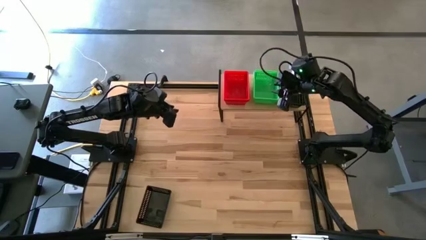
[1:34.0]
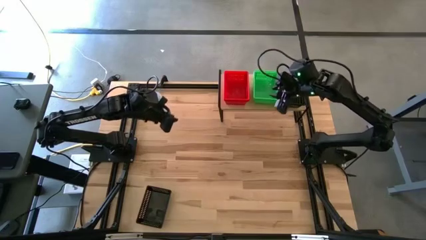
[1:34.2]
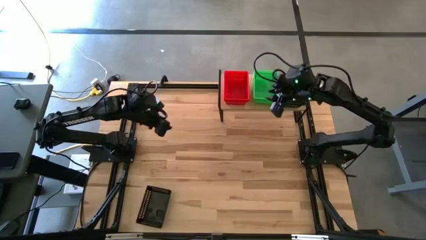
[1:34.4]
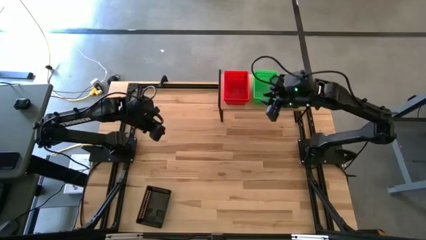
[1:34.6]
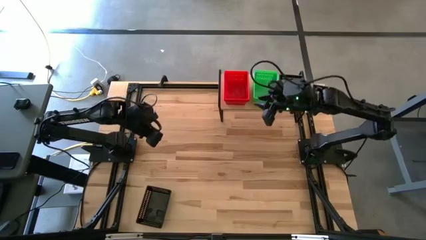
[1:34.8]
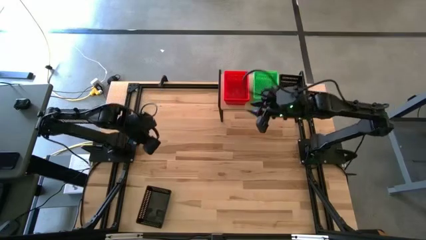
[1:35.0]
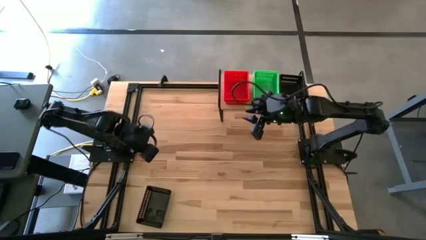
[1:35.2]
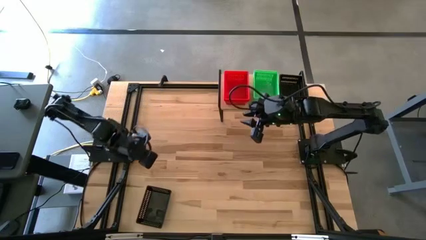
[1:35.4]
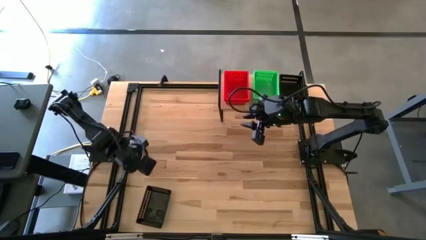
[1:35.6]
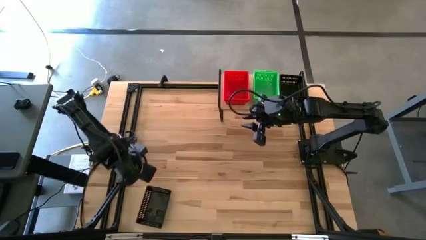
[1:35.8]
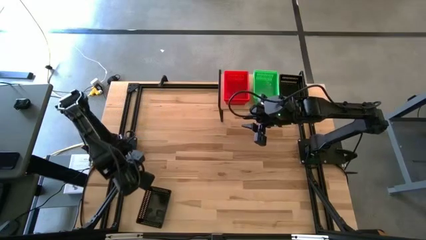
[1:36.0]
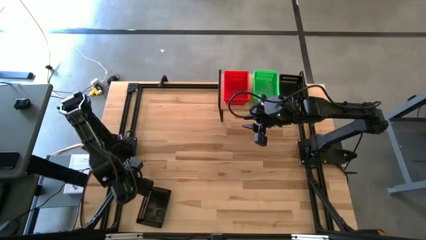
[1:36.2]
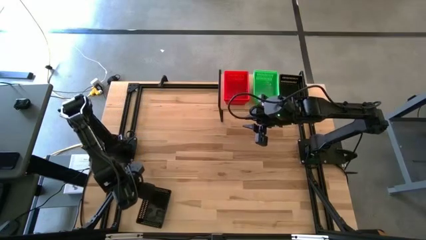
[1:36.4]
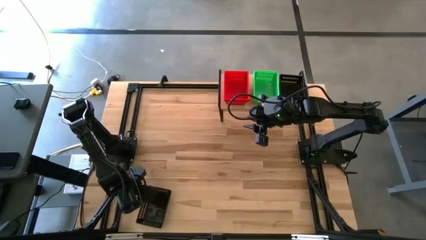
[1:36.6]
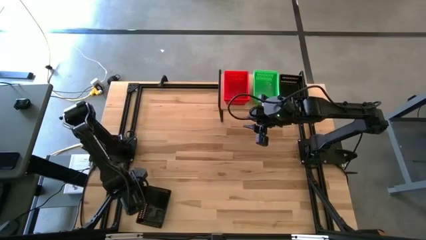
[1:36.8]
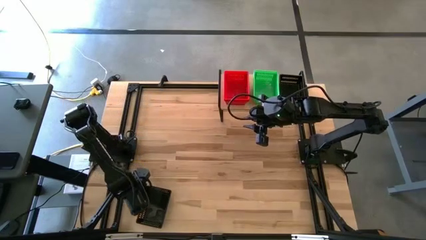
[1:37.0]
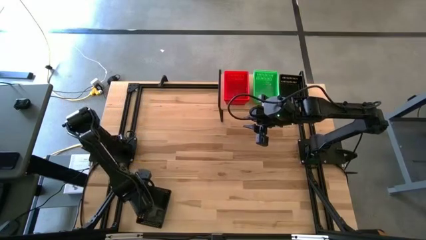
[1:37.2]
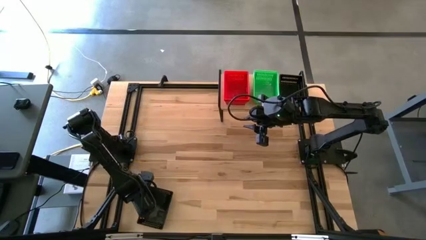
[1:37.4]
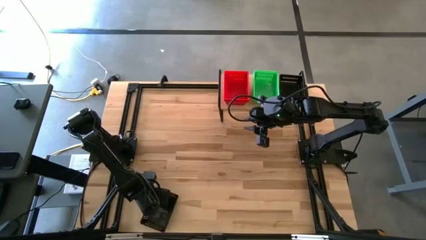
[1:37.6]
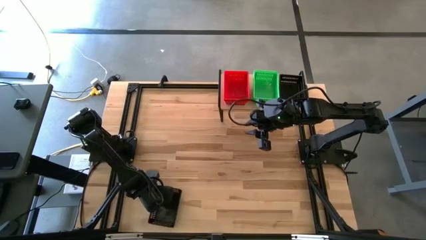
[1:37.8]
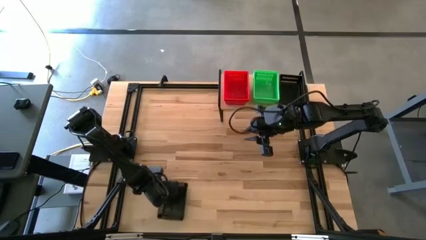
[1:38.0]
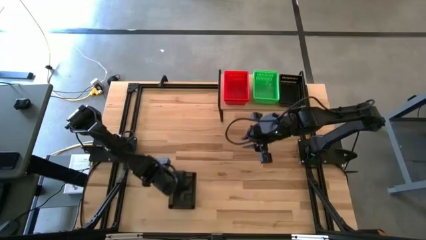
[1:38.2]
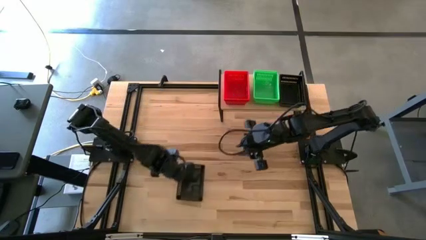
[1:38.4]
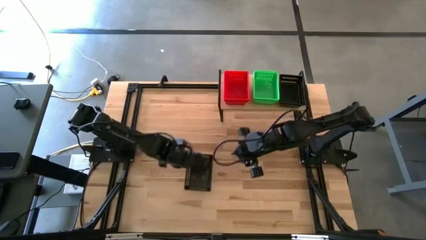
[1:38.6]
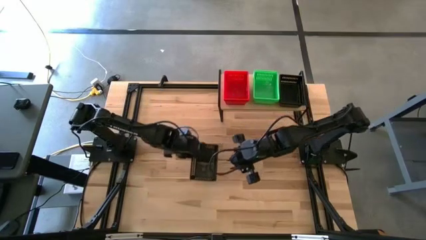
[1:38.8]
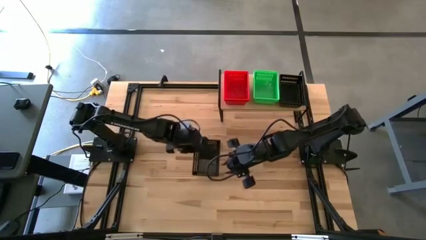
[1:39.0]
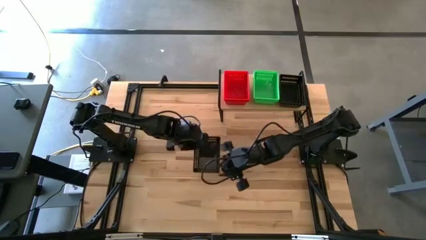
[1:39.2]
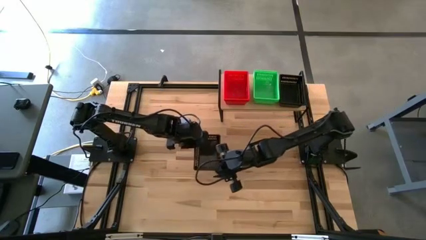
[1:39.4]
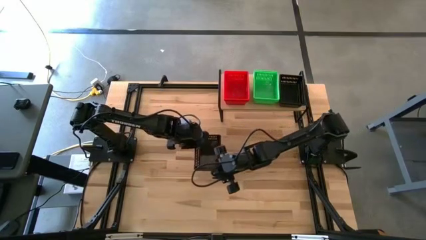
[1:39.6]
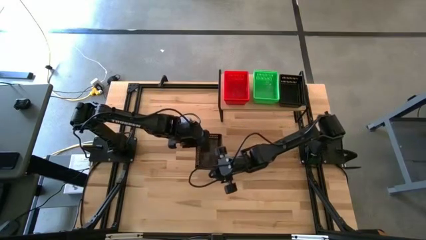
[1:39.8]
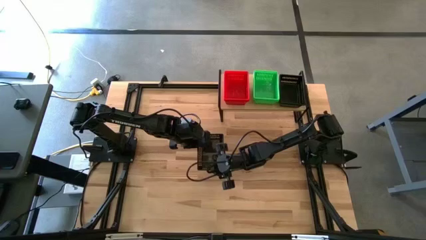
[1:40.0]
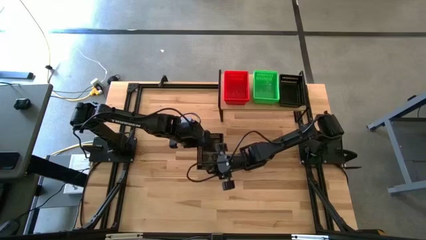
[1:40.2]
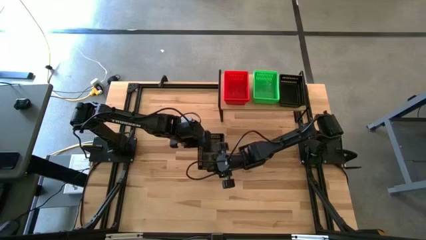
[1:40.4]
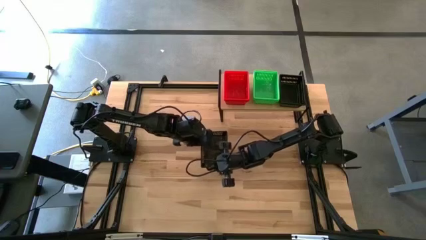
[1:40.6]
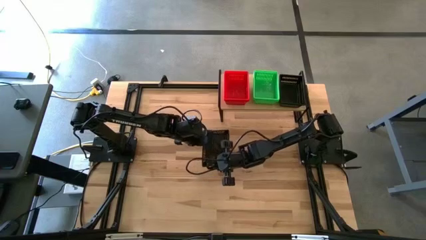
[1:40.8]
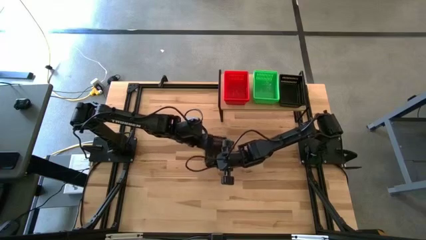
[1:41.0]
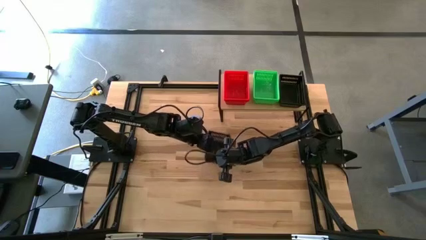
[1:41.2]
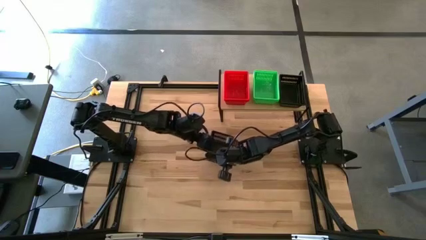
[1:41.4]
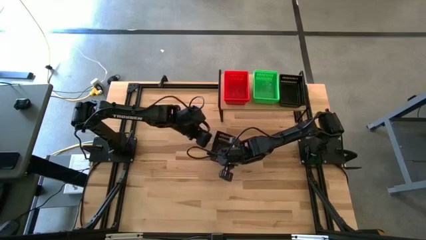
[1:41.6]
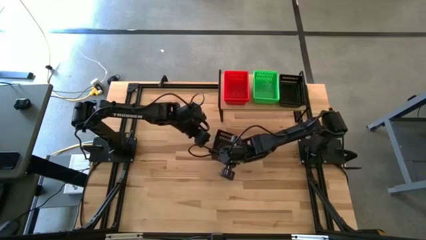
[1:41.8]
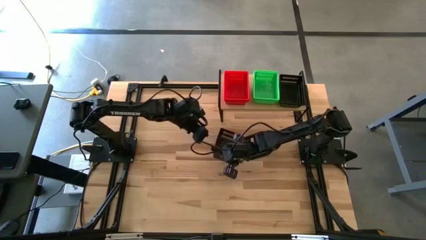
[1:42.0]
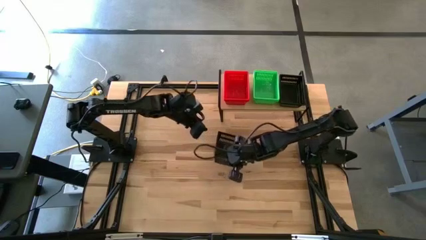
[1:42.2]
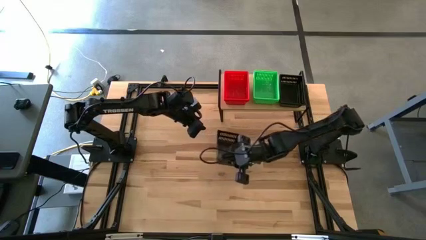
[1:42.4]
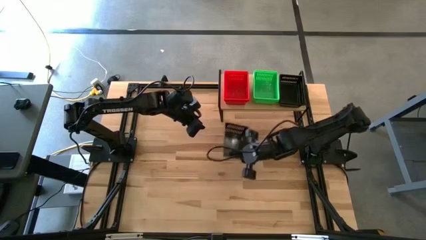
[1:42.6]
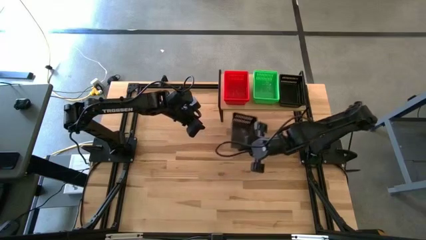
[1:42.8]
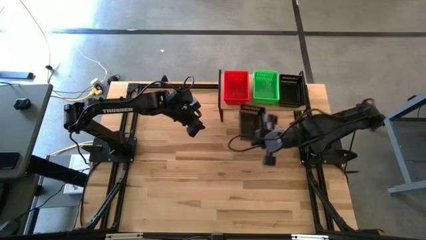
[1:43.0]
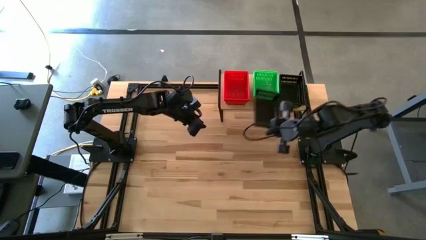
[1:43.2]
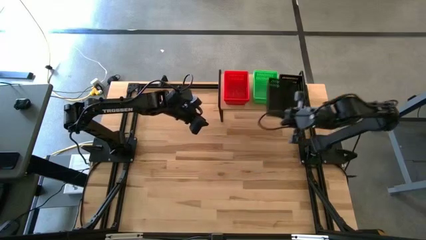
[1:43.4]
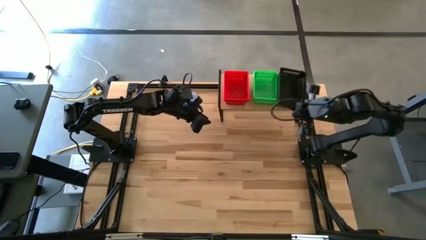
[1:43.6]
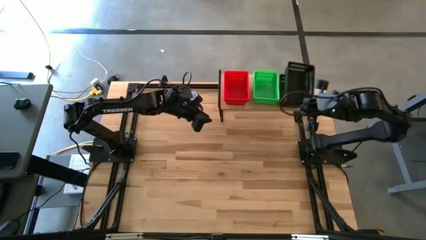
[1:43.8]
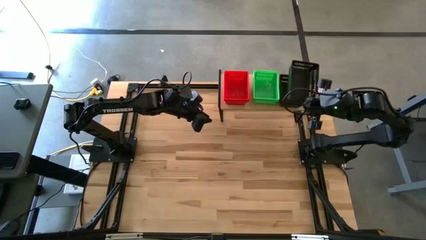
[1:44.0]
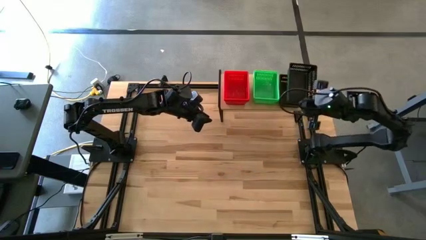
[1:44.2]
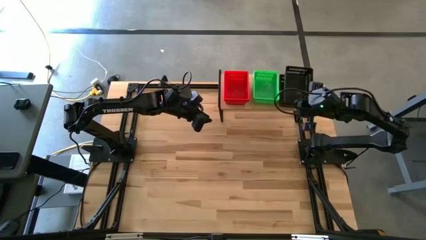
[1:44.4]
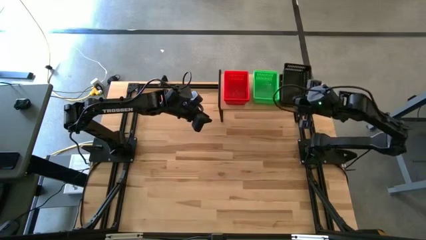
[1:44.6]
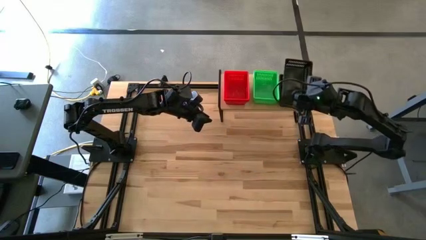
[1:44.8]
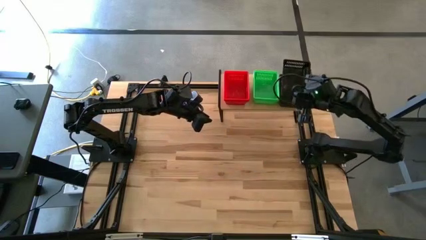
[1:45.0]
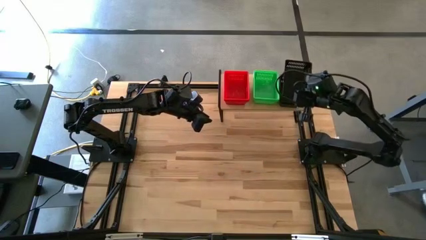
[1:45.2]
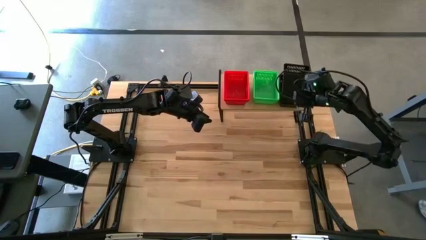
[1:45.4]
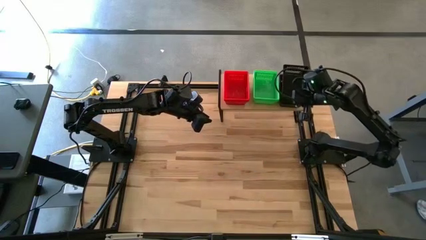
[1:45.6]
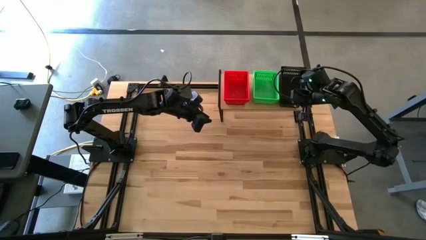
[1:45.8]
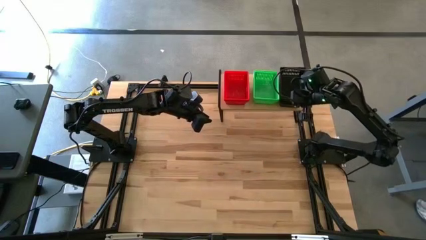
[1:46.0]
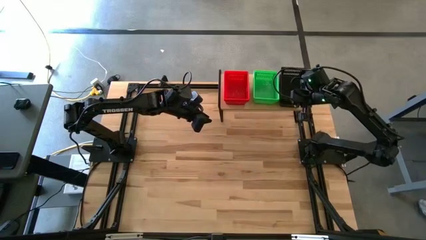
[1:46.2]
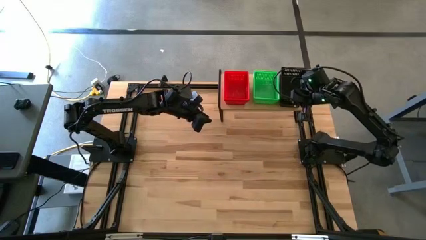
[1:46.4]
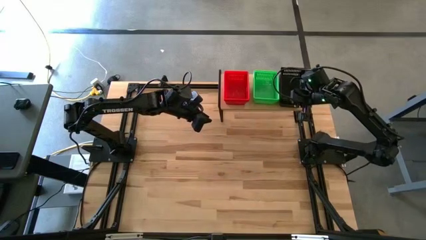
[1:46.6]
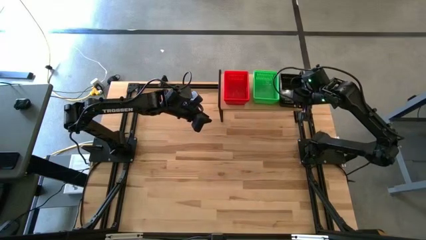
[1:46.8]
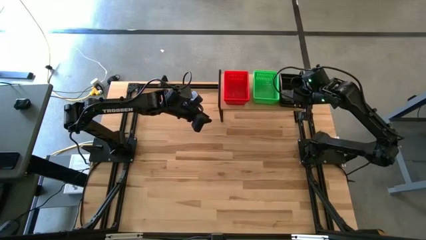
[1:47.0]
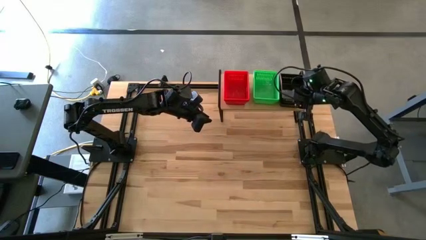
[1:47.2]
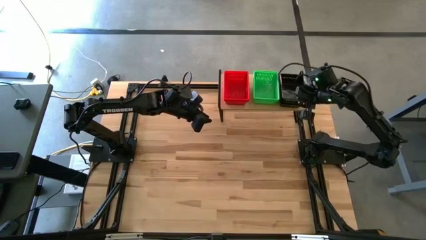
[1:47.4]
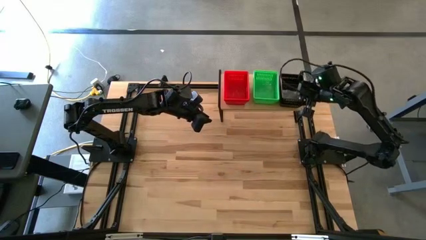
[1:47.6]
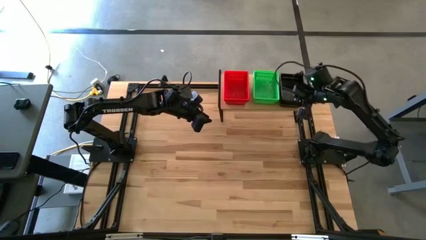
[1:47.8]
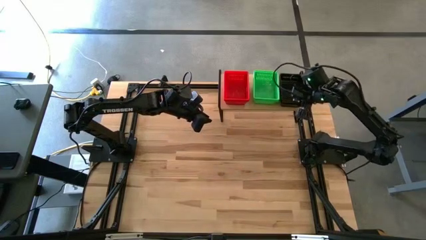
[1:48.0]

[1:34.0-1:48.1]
Task: Stack baskets on shelf by color
Stack the black bin on top of the black bin
